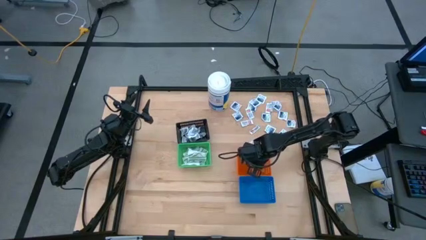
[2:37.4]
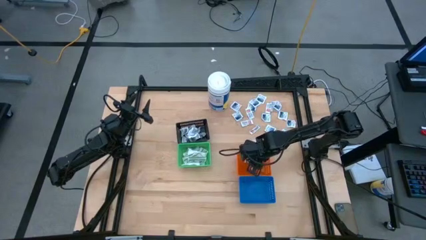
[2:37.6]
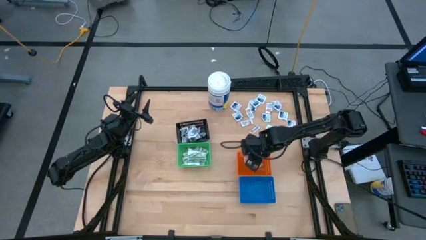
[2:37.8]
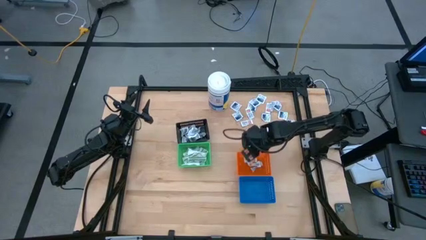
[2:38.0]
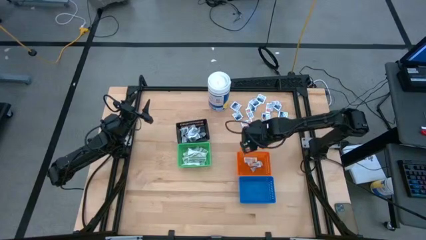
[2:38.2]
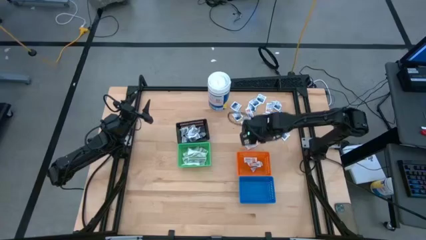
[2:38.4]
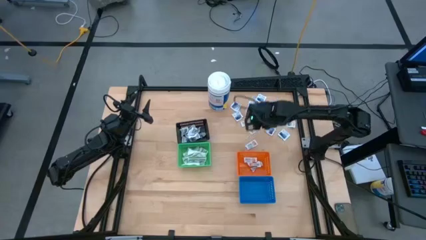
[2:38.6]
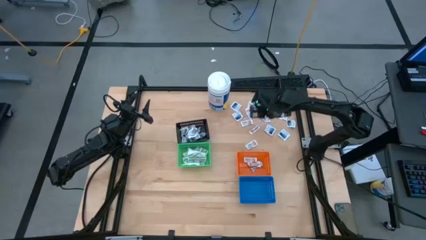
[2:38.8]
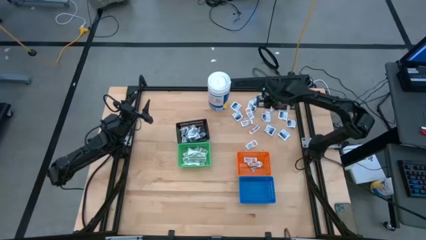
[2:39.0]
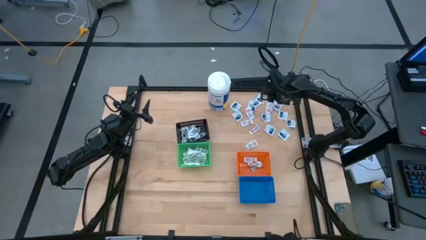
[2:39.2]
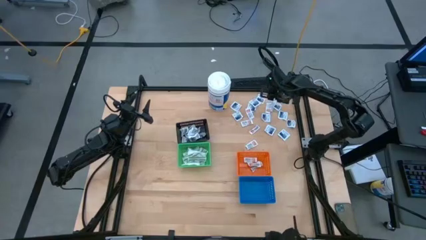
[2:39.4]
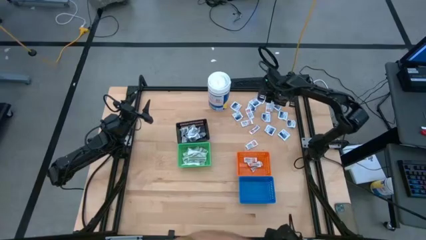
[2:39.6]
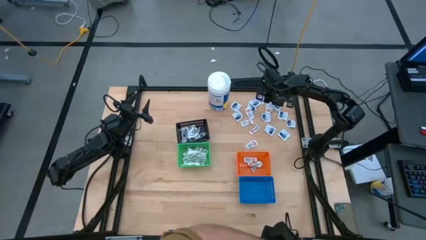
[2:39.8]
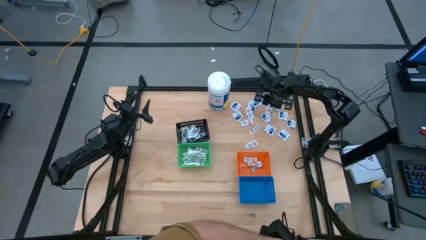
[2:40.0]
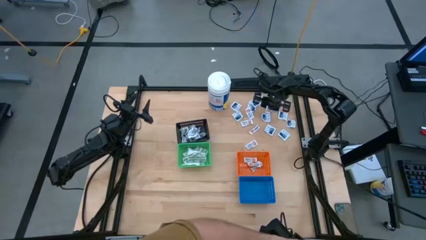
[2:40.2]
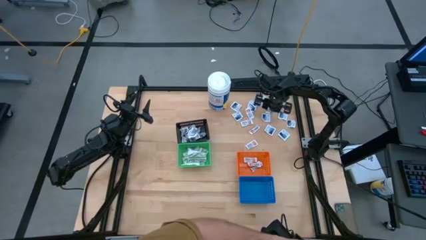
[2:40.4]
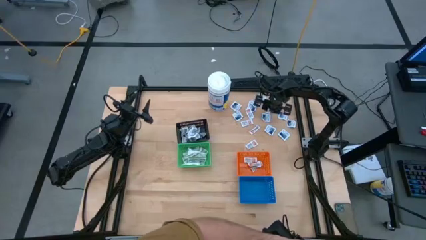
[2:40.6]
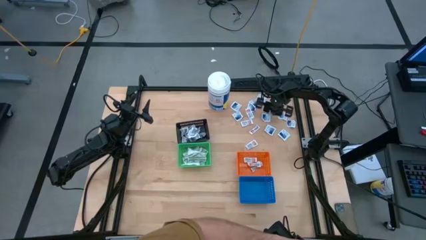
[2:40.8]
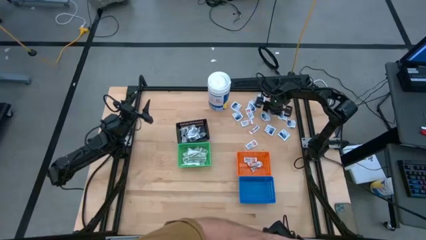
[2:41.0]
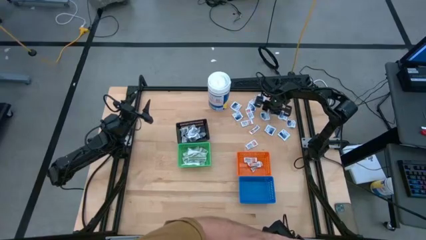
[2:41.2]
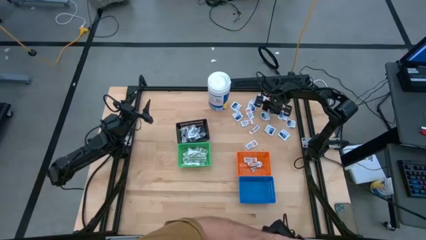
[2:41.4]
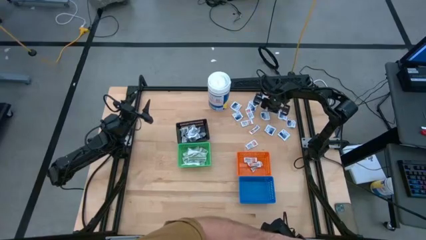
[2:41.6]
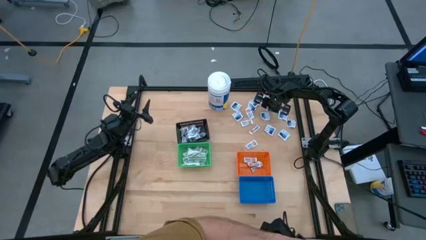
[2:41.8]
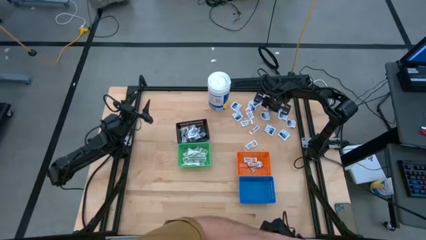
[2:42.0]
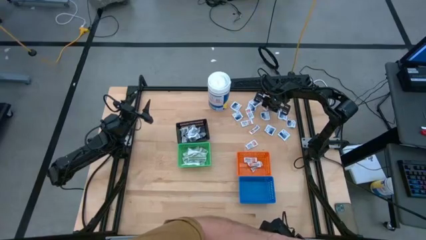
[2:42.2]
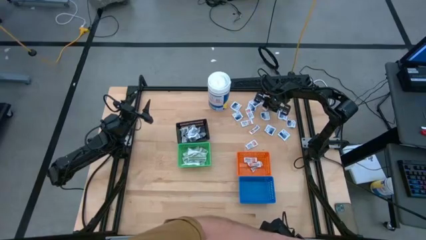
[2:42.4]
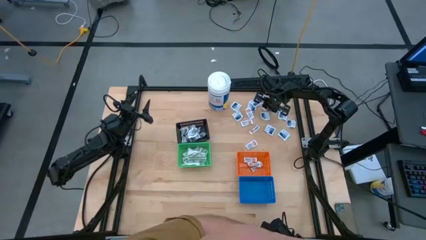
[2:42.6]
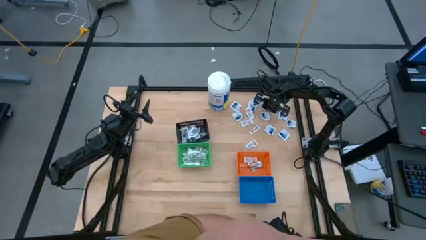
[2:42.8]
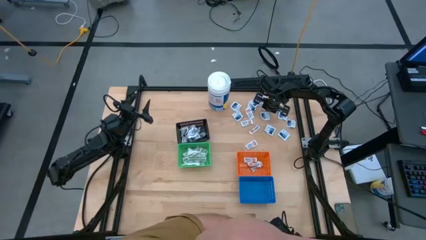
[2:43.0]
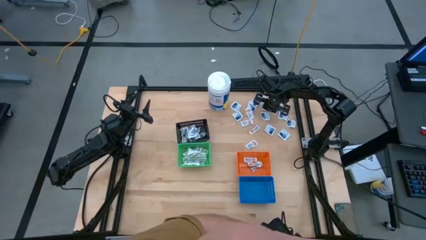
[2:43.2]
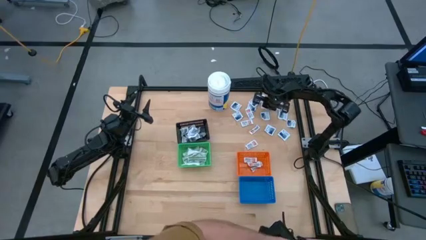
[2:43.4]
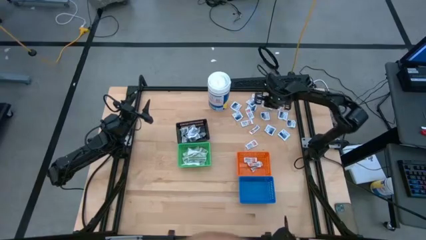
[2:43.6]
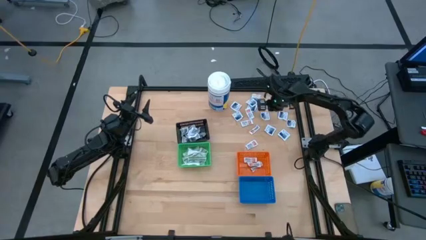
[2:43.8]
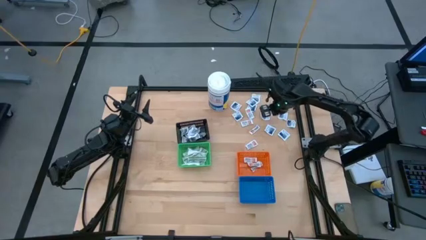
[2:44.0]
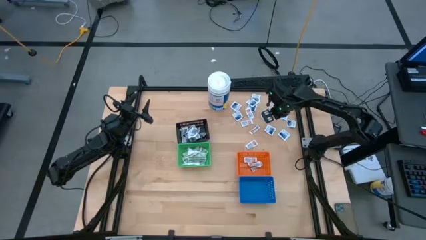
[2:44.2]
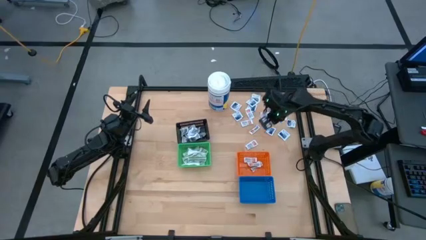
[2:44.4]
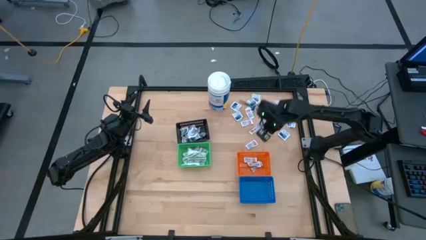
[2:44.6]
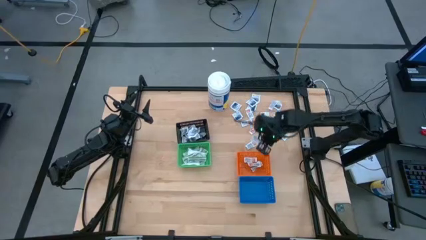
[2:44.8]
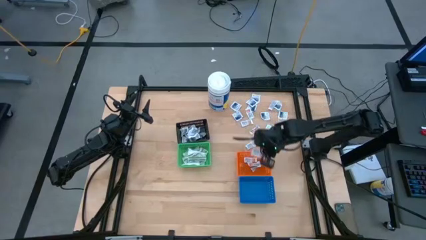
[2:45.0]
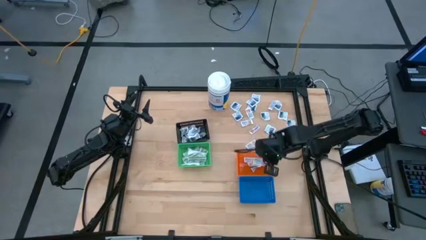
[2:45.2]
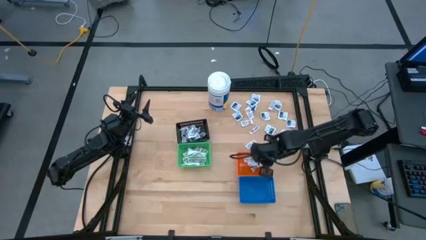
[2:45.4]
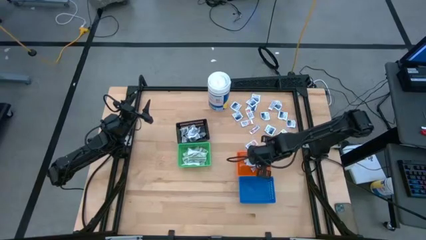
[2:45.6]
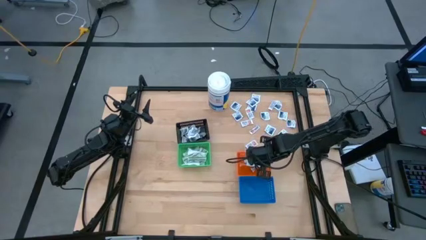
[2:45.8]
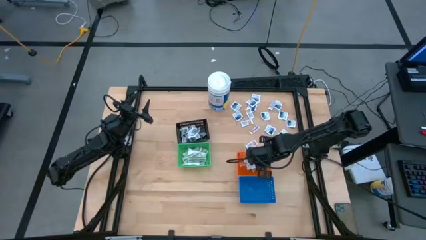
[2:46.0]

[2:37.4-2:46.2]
Task: Pick & Place First Aid Supplies
Put the orange pad into the orange bin

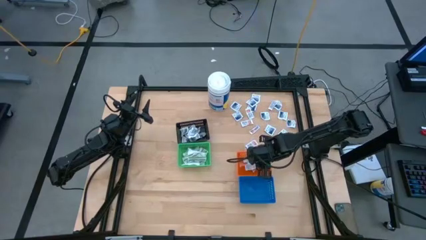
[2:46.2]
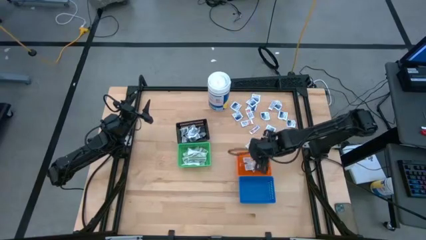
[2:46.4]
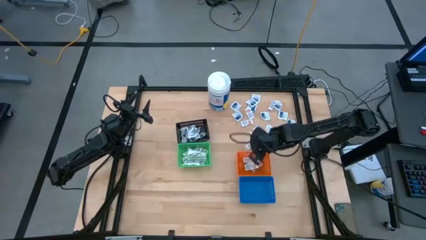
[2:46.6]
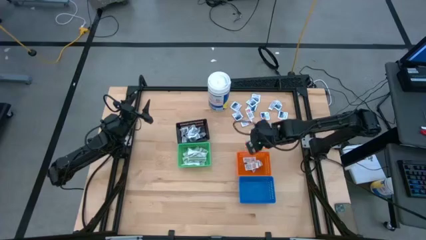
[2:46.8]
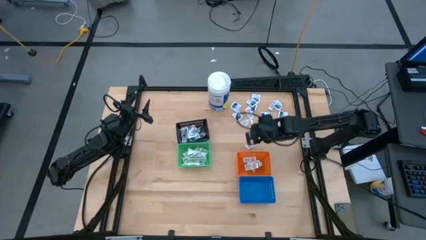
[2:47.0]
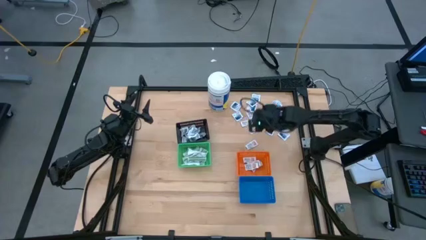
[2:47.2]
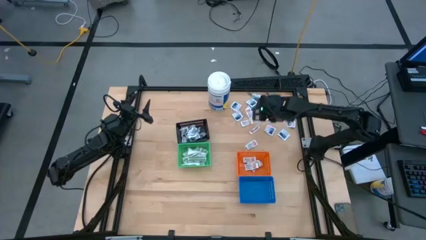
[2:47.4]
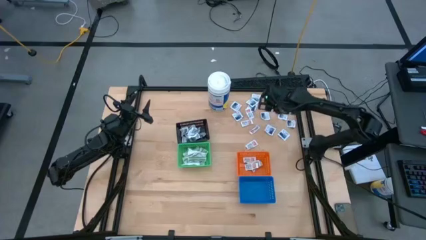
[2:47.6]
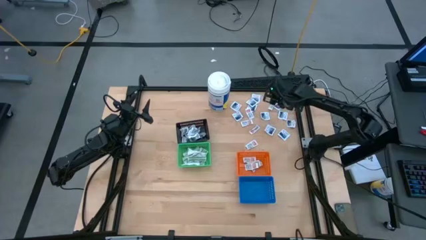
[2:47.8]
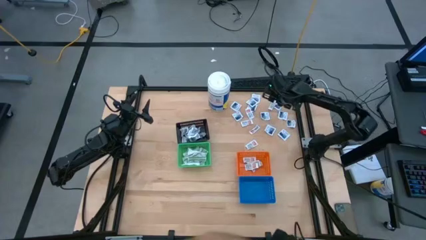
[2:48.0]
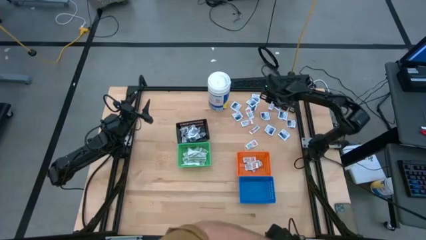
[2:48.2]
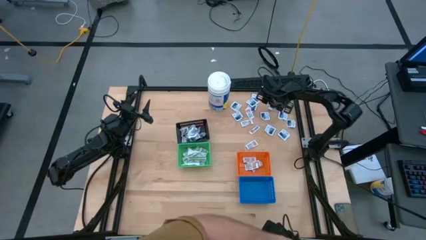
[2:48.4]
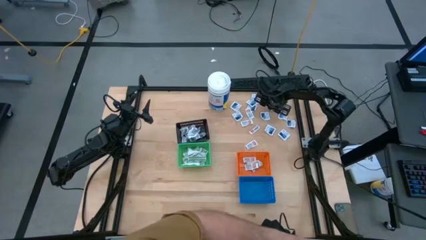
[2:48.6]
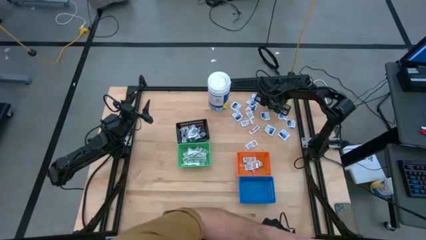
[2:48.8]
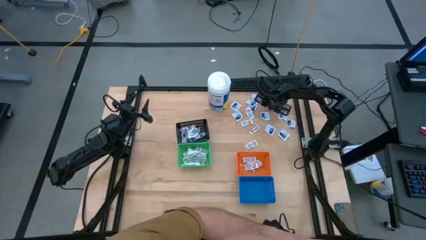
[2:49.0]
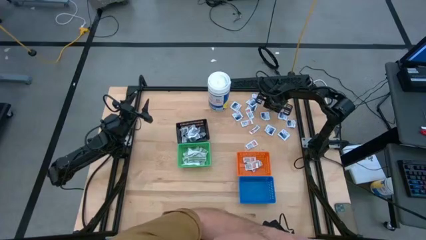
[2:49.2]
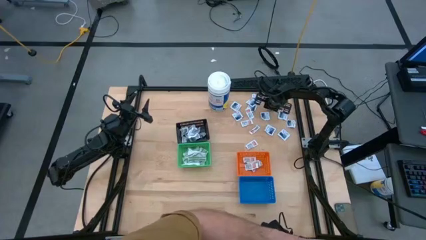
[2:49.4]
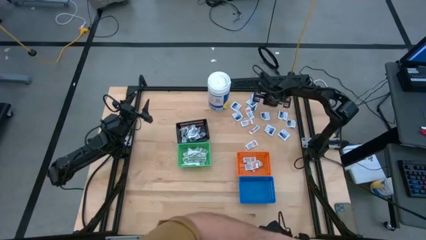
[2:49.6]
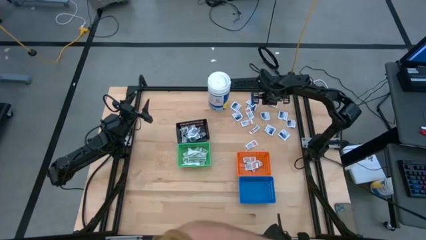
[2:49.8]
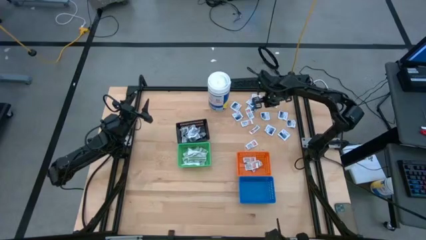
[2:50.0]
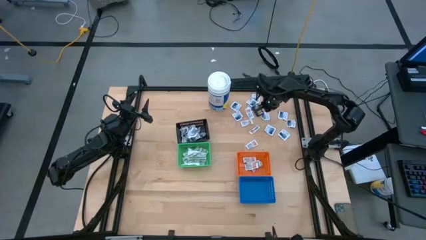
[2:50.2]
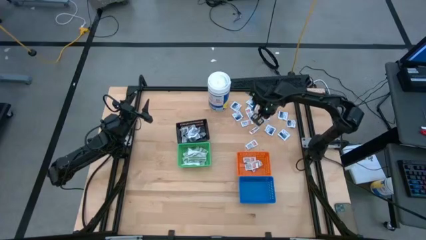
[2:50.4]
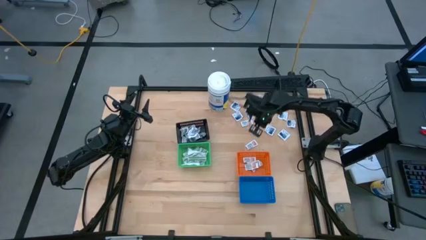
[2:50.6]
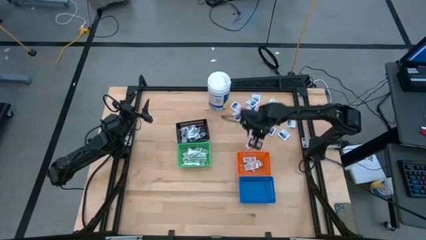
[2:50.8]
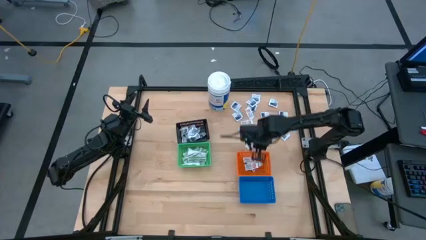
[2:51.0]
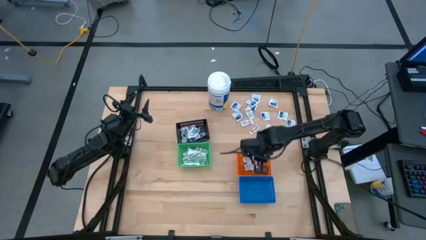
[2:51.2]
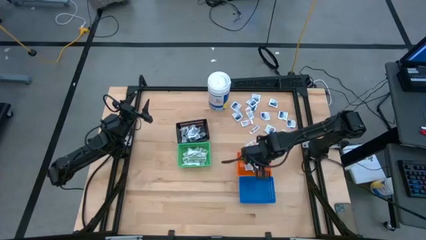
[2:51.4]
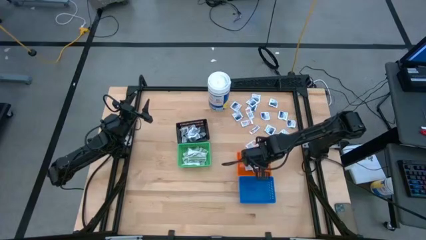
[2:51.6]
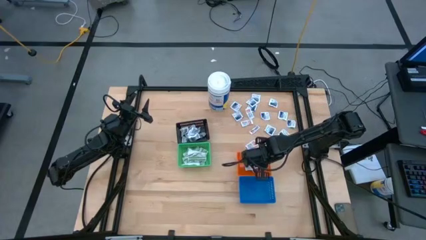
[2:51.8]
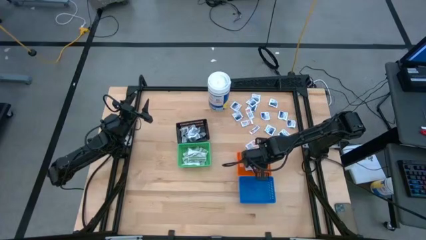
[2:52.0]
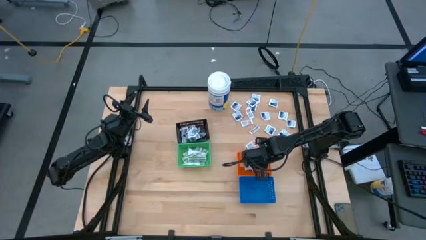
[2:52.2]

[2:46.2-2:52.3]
Put the orange pad into the orange bin
